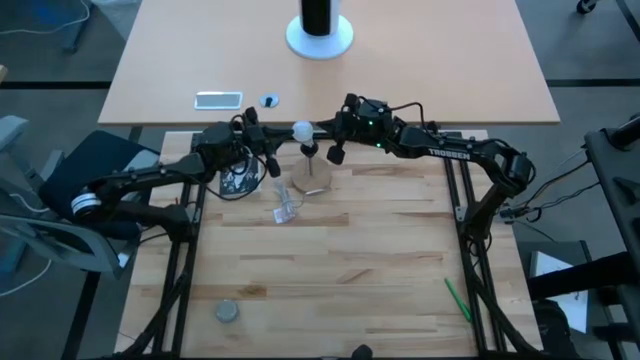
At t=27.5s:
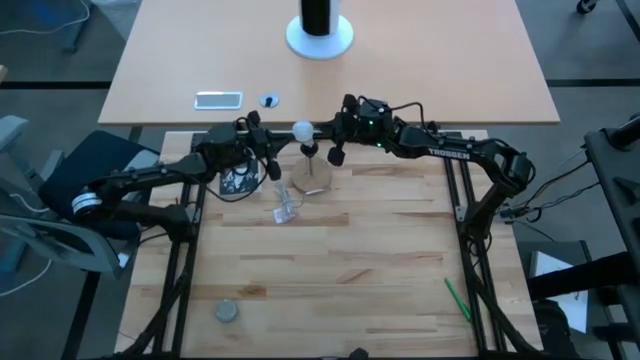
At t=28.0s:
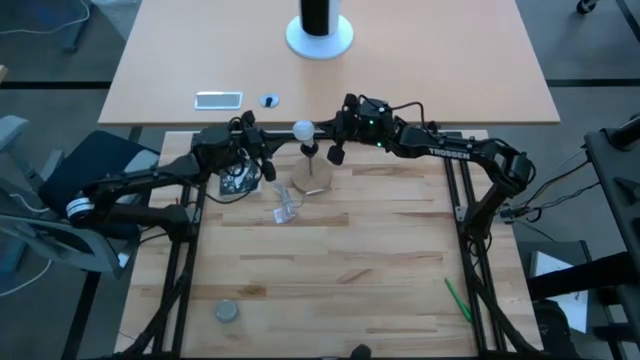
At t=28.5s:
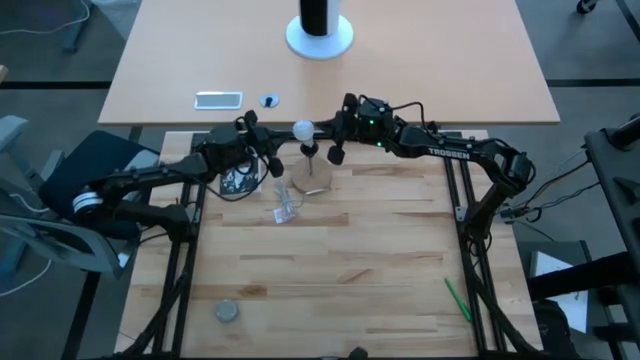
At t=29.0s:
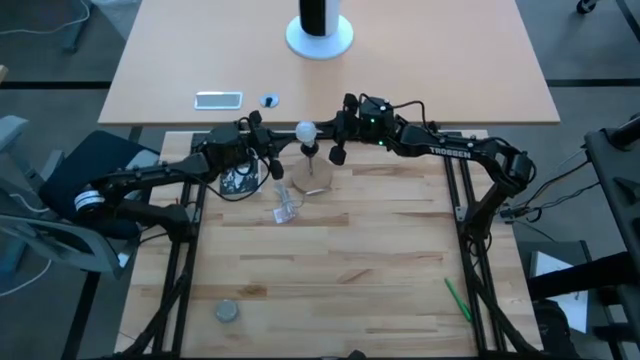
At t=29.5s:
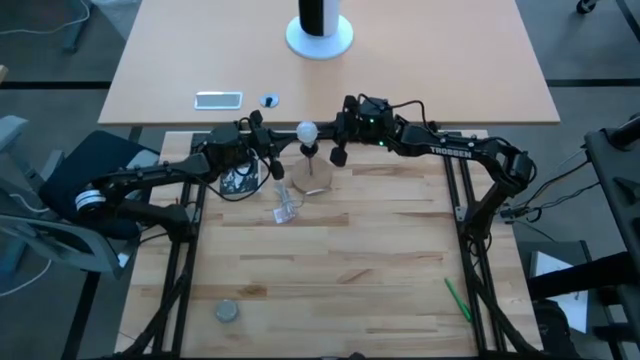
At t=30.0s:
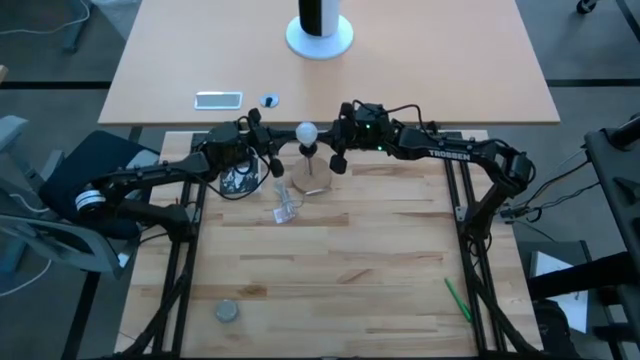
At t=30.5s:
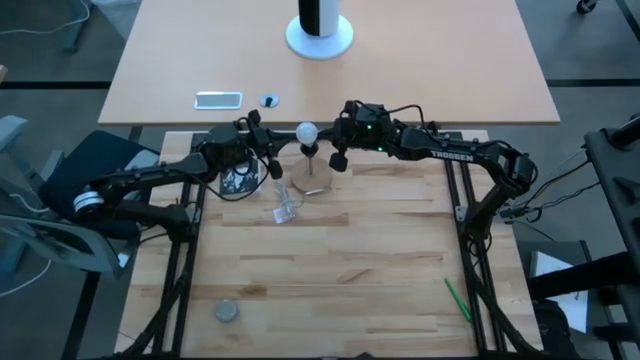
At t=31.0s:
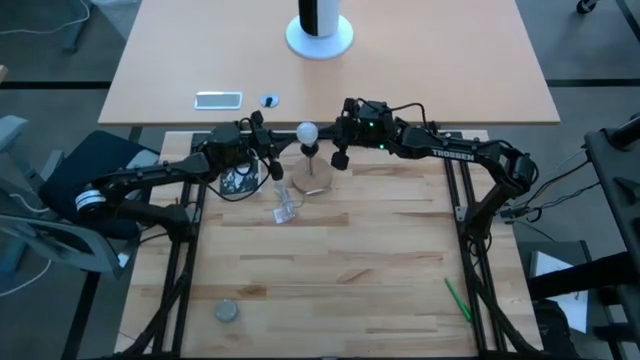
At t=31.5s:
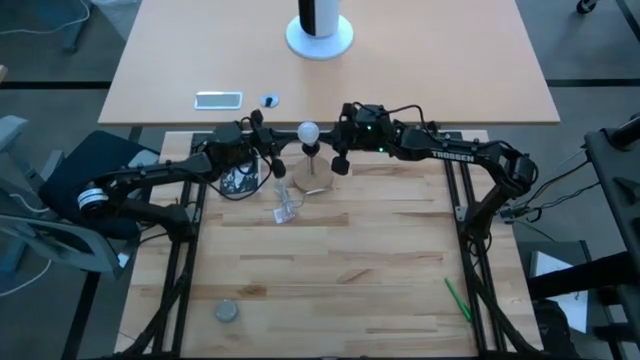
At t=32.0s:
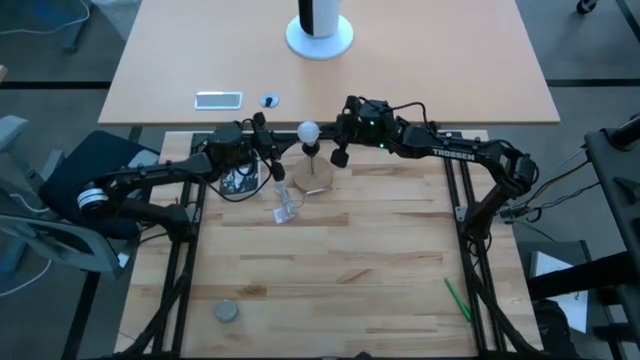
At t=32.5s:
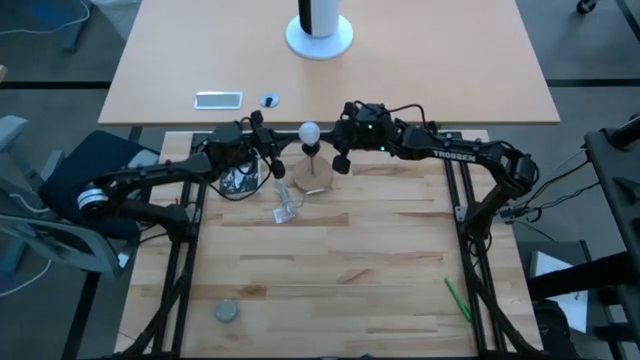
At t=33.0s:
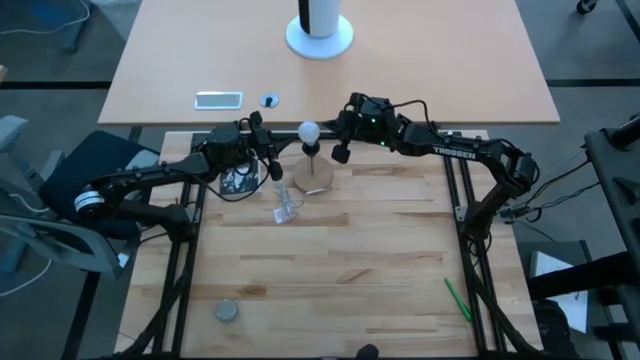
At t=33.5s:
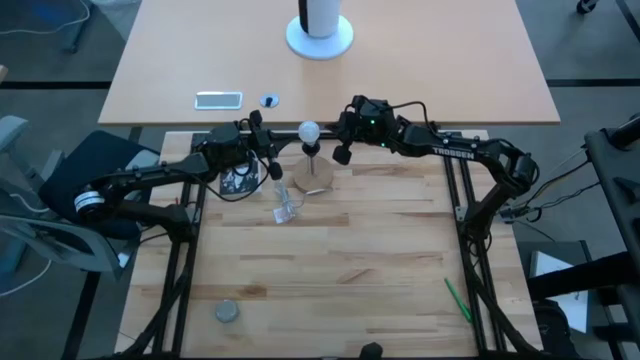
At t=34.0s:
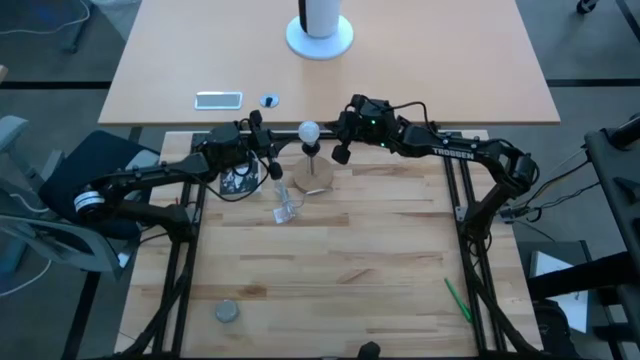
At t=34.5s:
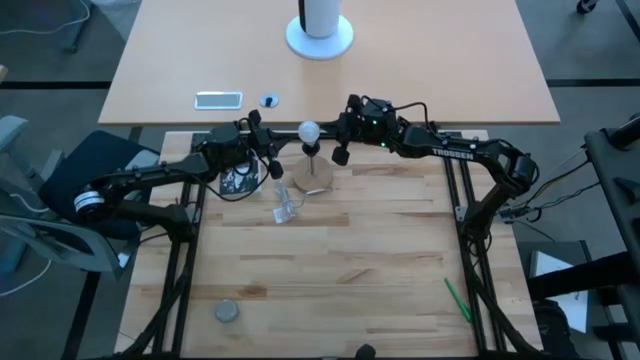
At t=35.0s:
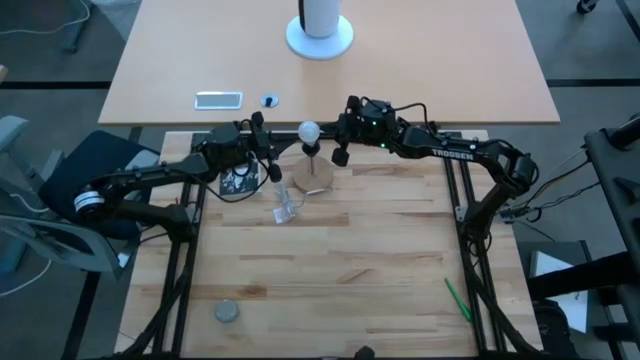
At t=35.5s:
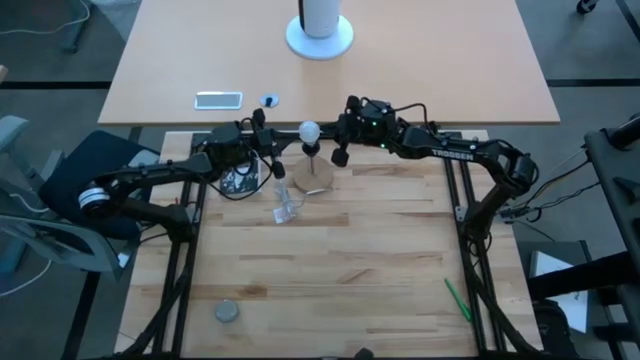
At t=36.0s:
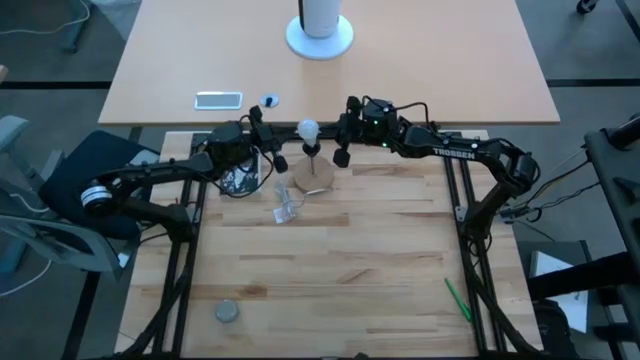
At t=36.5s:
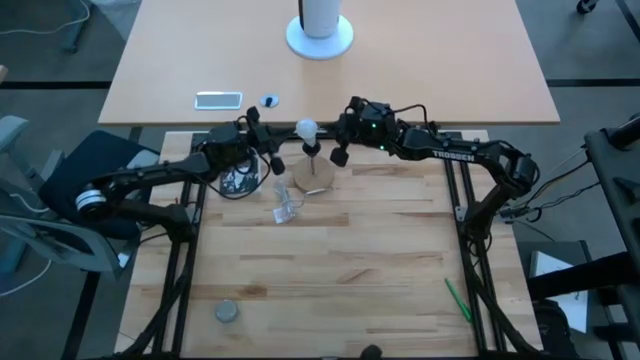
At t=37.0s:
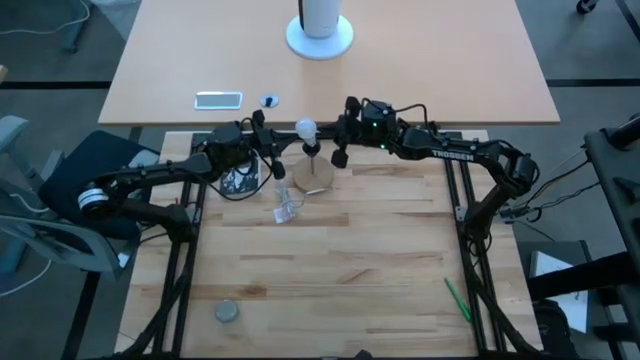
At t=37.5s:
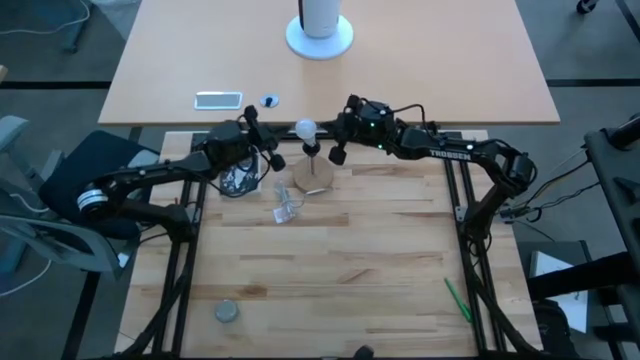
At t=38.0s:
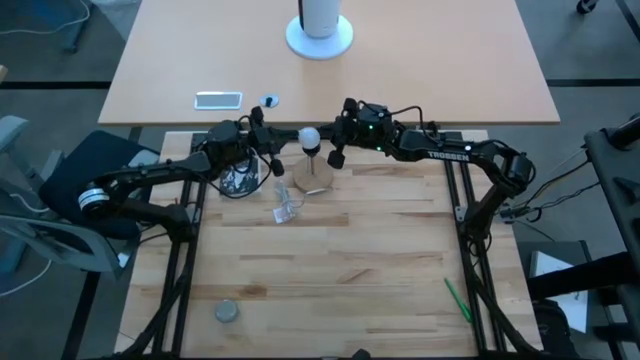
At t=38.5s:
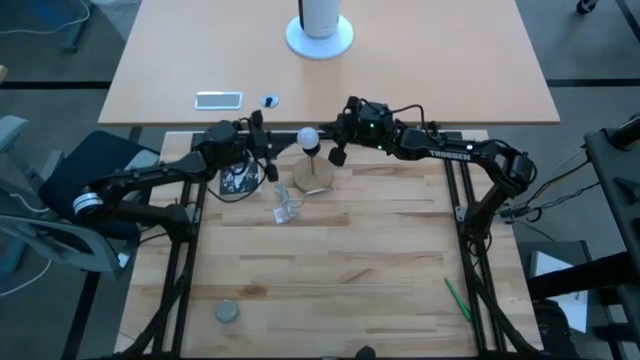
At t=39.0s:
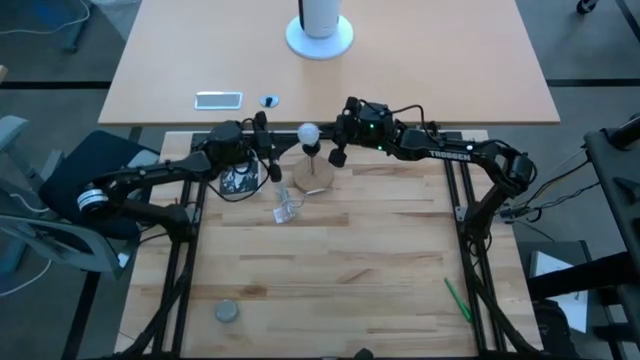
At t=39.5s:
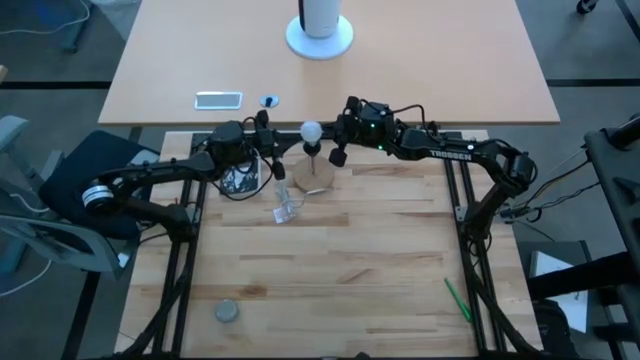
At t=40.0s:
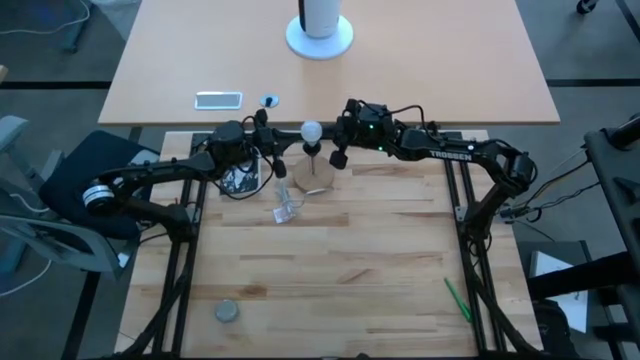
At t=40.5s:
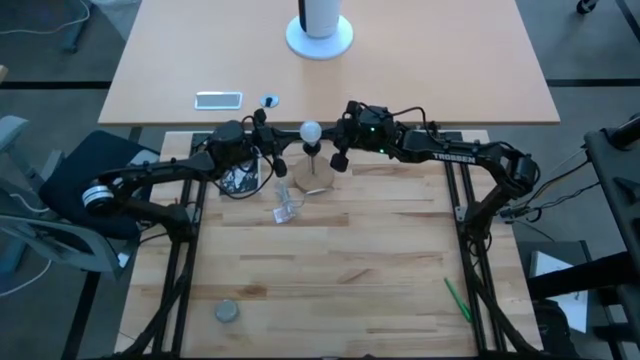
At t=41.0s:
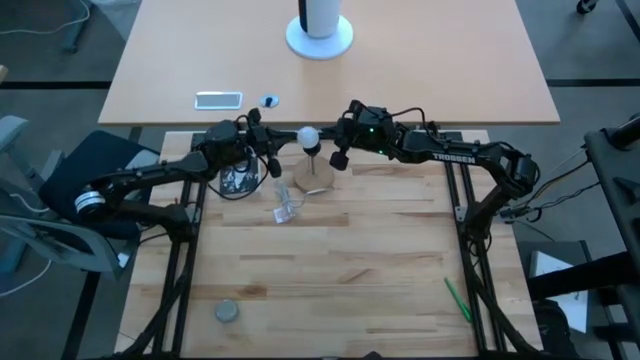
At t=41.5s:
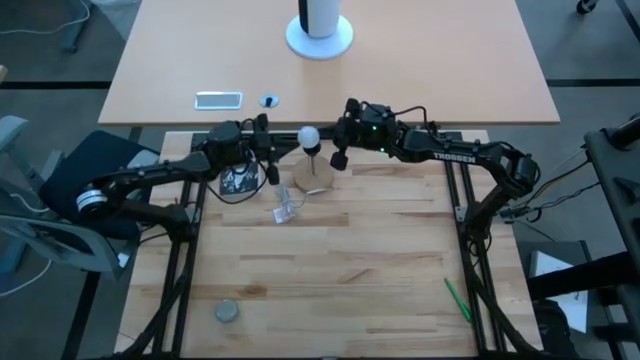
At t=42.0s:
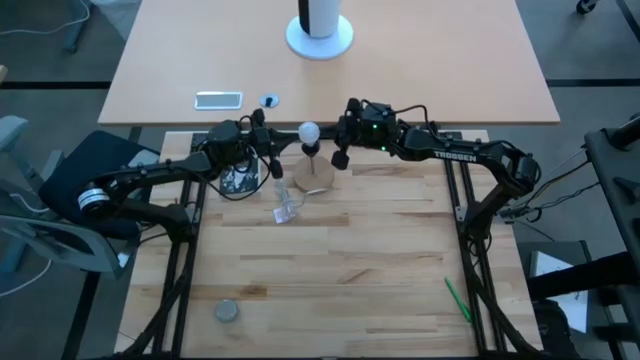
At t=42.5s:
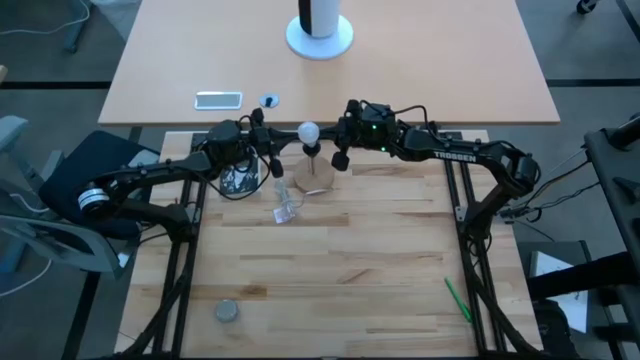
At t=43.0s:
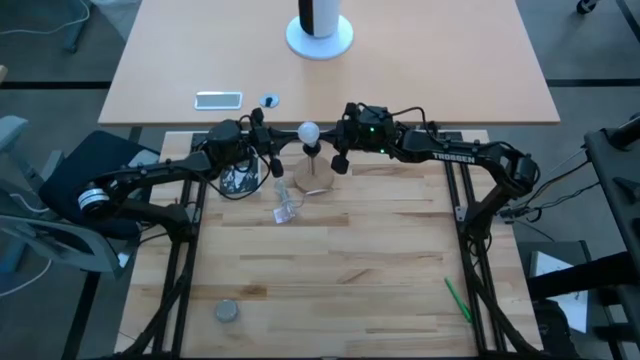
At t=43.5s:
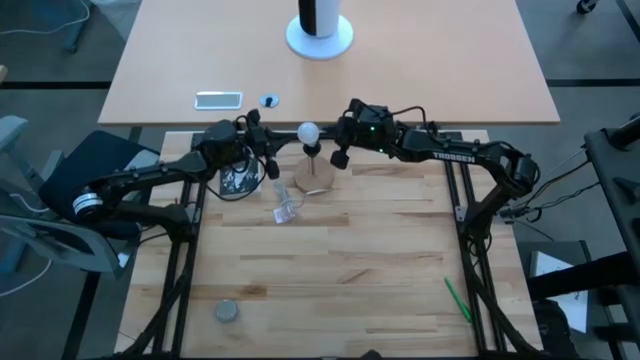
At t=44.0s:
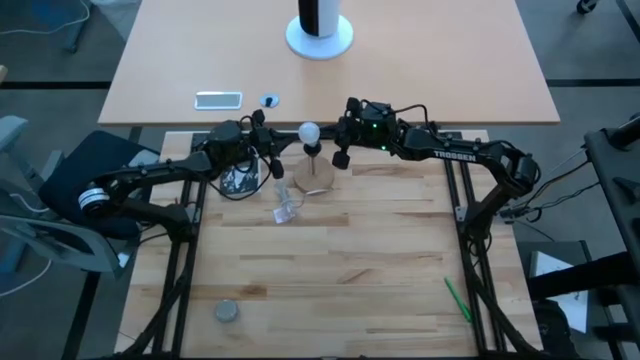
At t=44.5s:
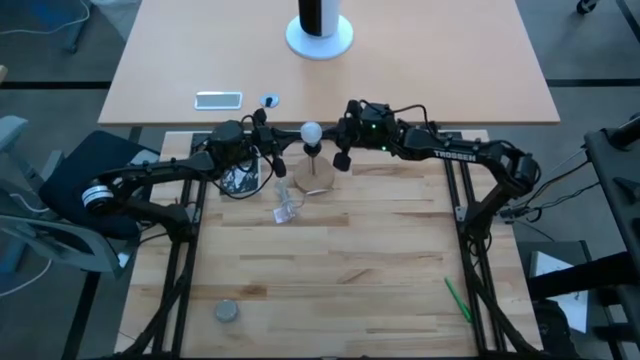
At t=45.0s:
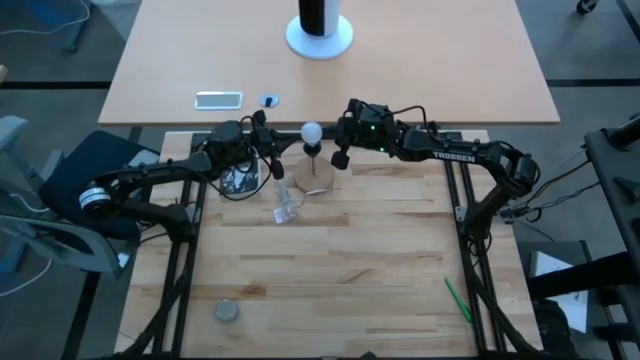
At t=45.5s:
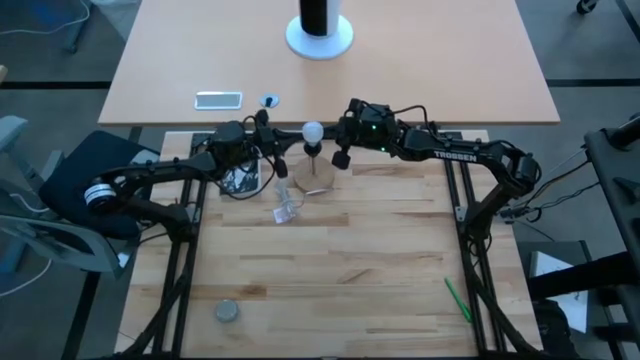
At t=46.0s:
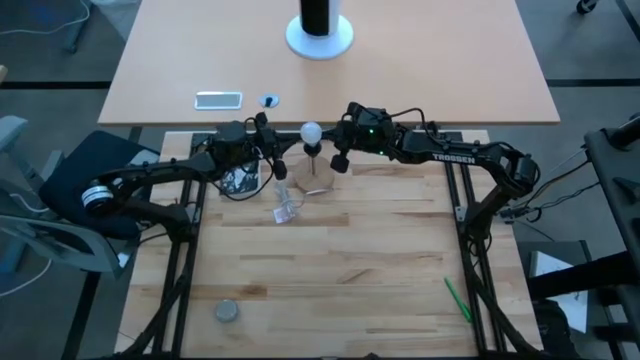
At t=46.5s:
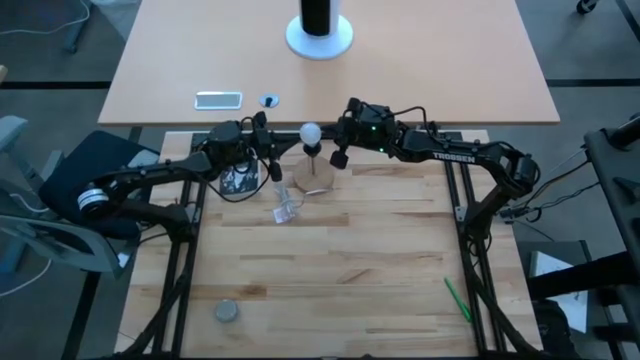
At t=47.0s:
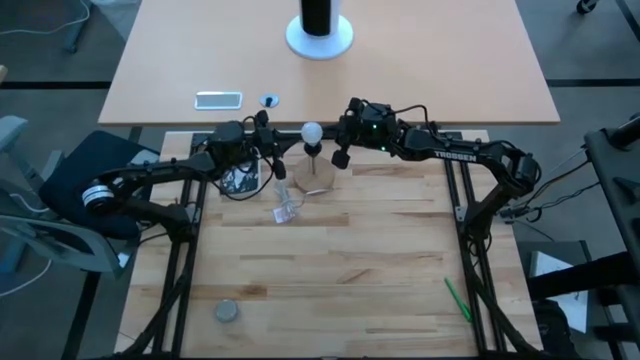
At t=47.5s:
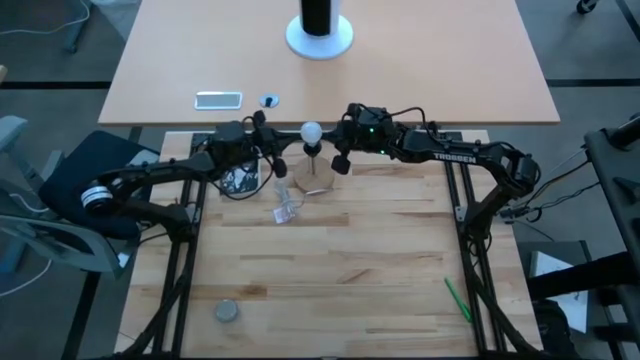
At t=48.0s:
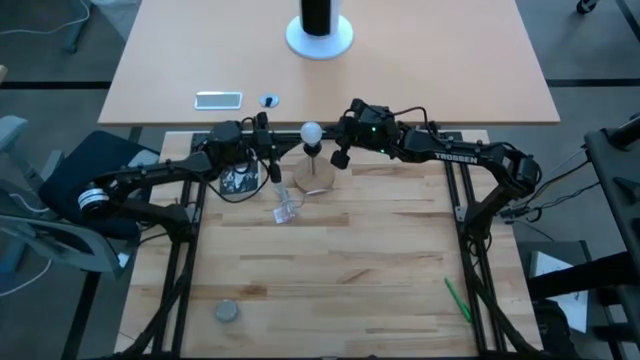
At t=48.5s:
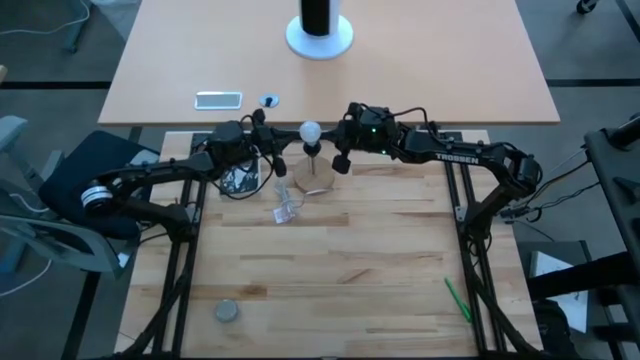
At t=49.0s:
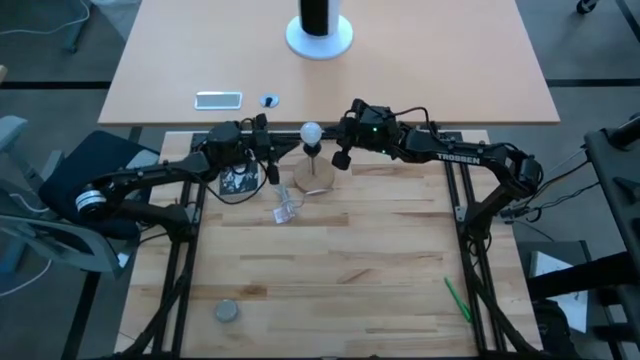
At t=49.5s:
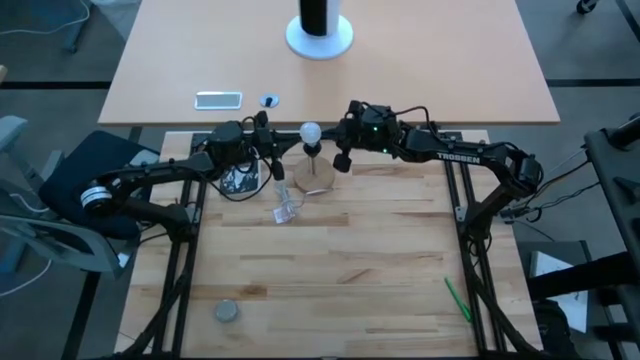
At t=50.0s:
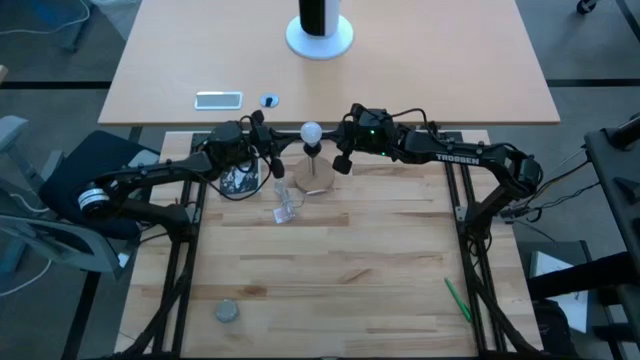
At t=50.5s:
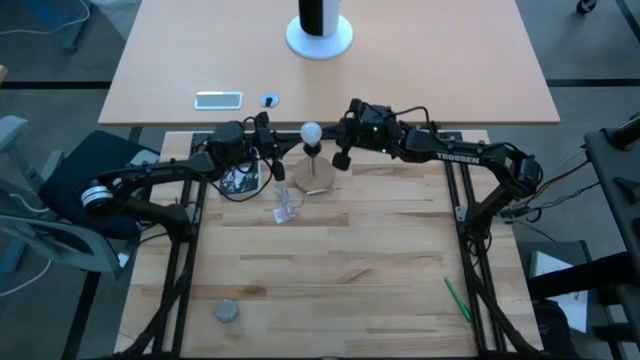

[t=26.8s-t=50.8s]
Task: Screw lightbulb
Insert the lightbulb into the lamp
